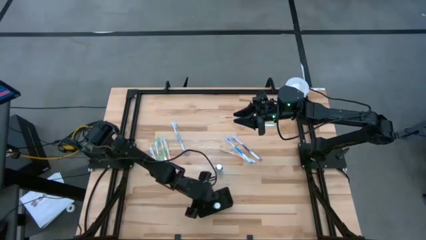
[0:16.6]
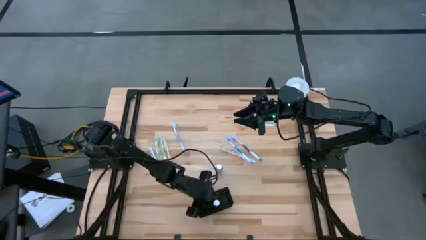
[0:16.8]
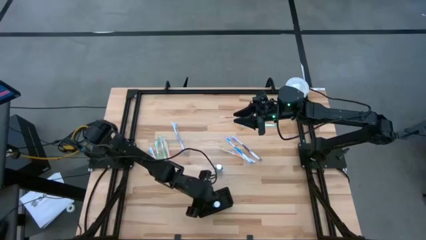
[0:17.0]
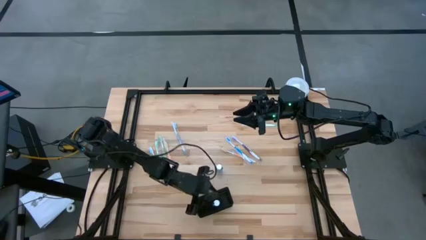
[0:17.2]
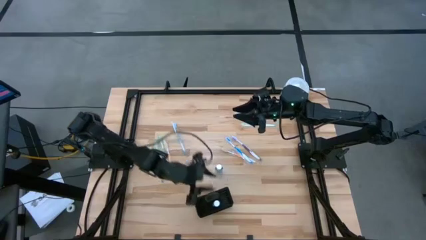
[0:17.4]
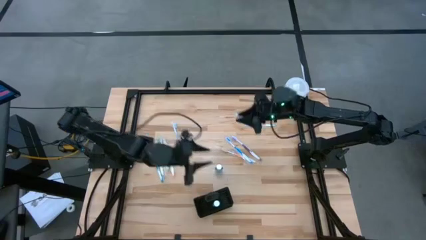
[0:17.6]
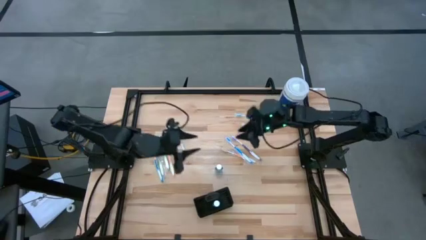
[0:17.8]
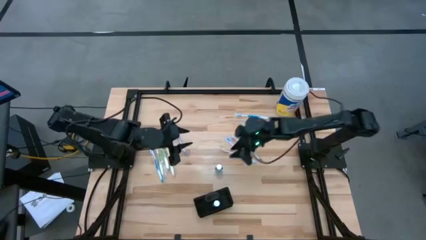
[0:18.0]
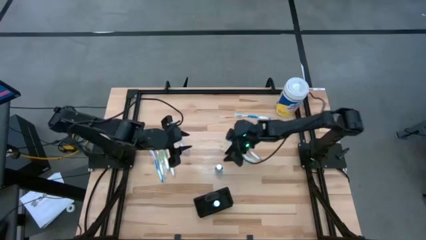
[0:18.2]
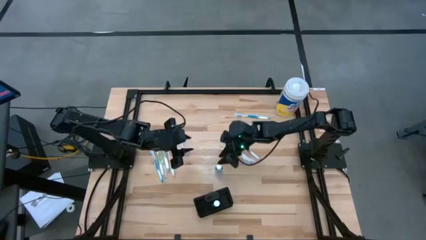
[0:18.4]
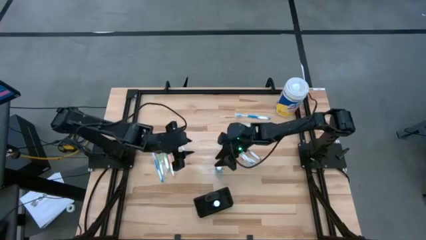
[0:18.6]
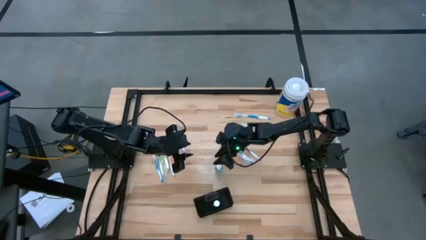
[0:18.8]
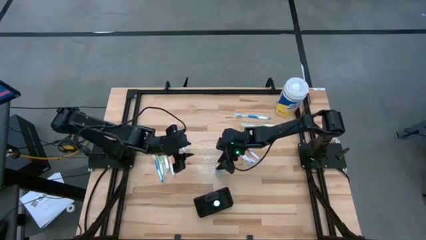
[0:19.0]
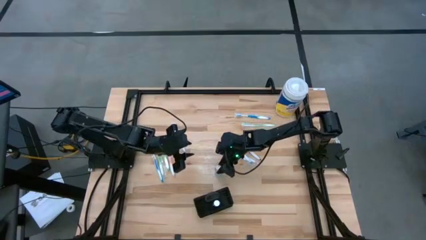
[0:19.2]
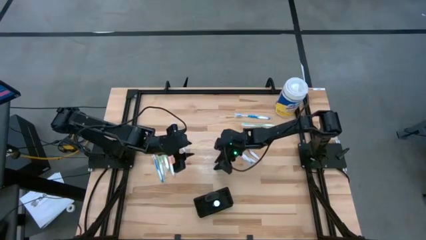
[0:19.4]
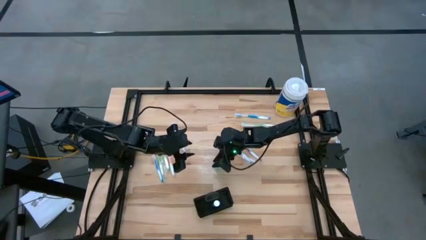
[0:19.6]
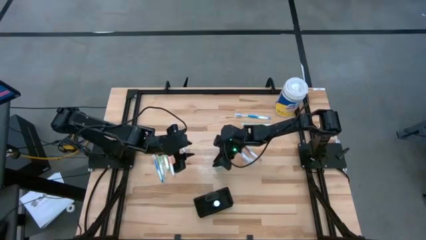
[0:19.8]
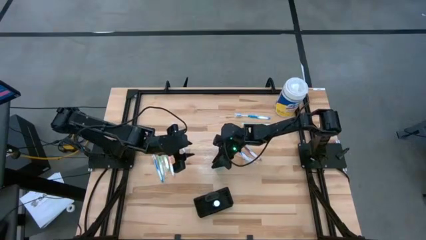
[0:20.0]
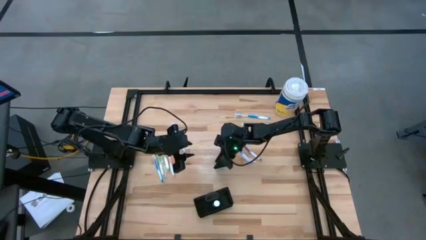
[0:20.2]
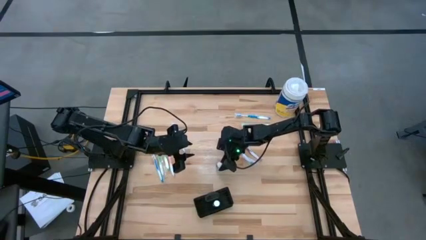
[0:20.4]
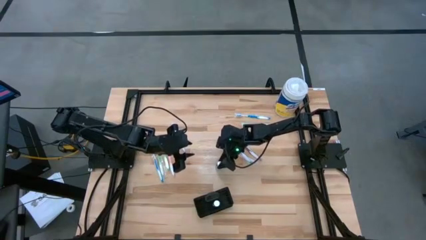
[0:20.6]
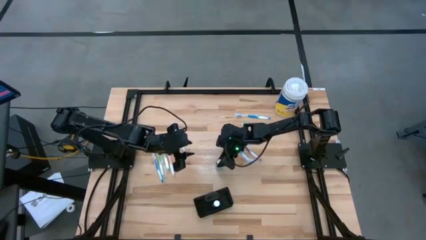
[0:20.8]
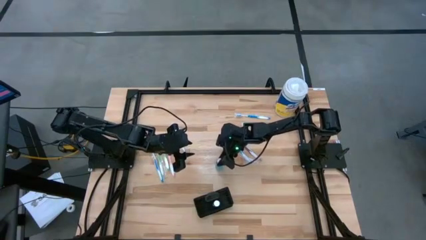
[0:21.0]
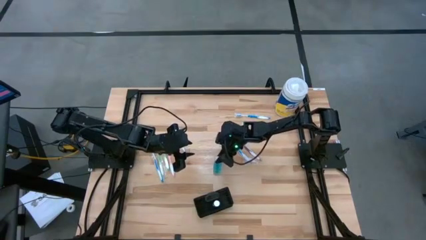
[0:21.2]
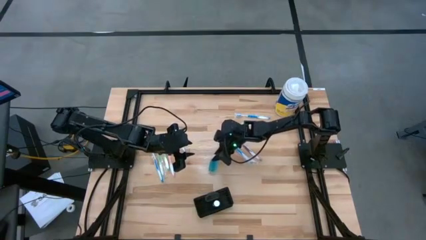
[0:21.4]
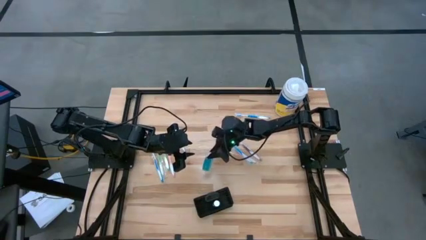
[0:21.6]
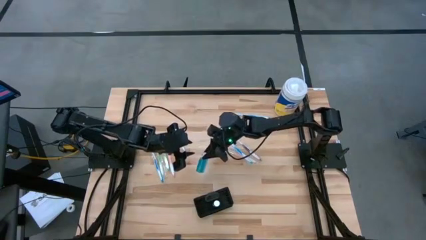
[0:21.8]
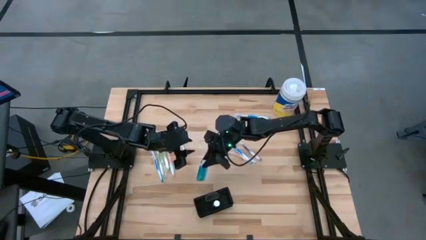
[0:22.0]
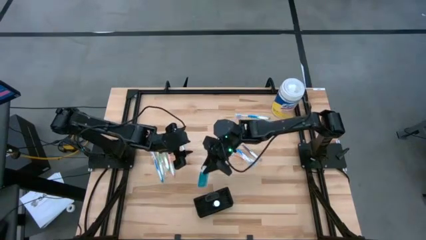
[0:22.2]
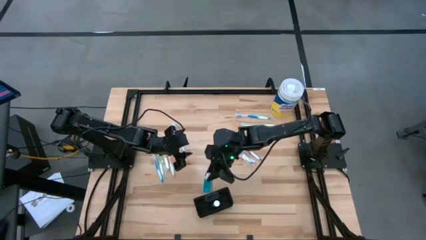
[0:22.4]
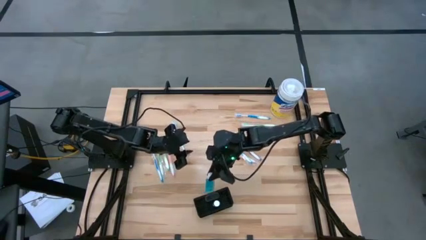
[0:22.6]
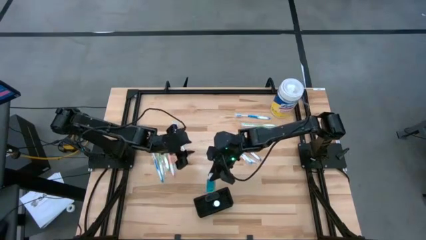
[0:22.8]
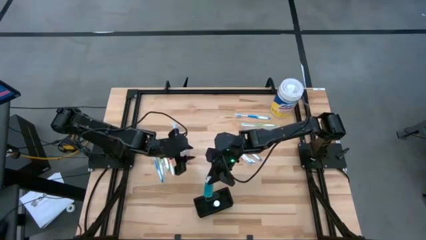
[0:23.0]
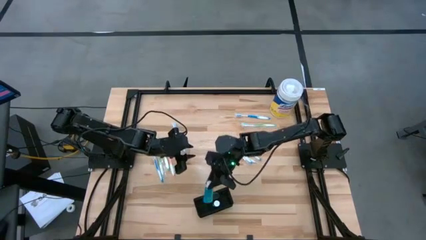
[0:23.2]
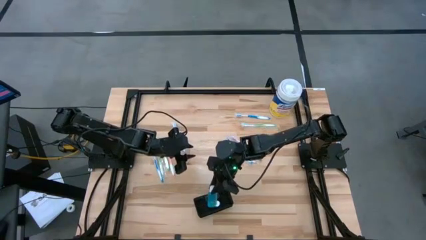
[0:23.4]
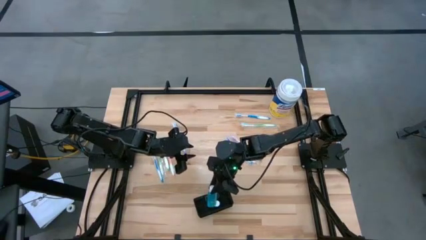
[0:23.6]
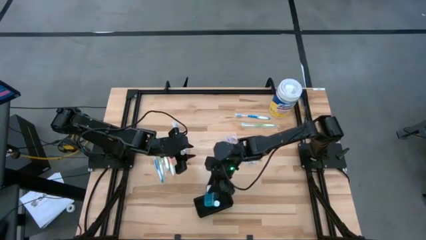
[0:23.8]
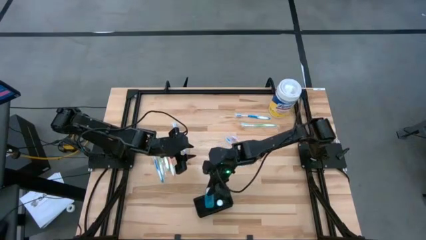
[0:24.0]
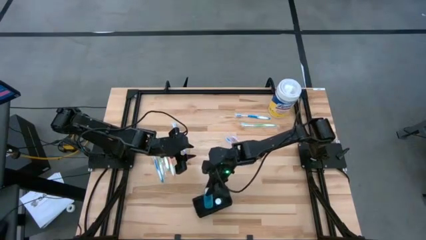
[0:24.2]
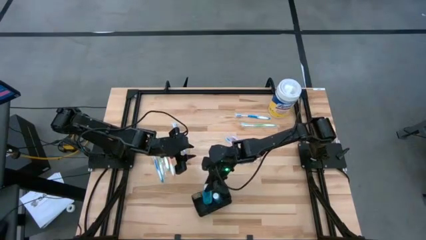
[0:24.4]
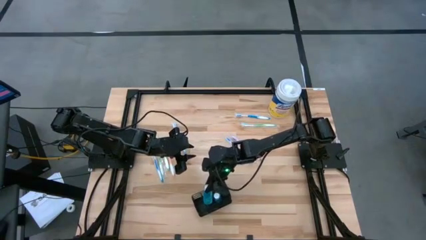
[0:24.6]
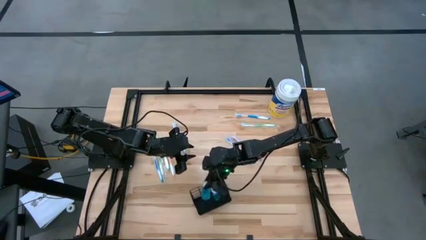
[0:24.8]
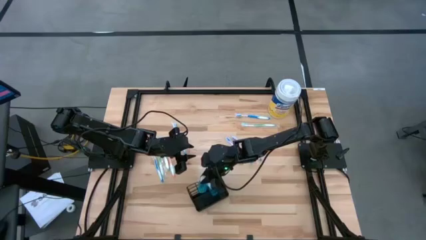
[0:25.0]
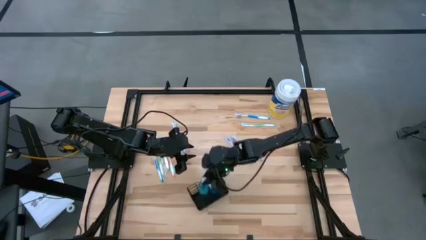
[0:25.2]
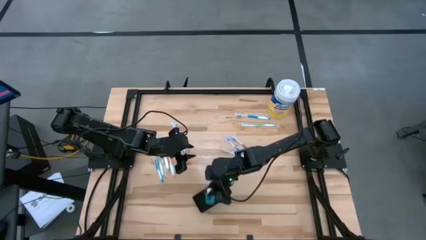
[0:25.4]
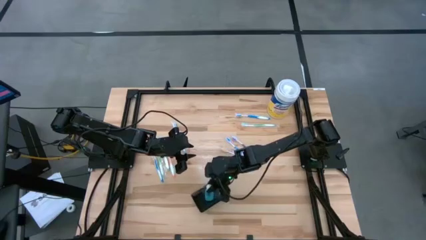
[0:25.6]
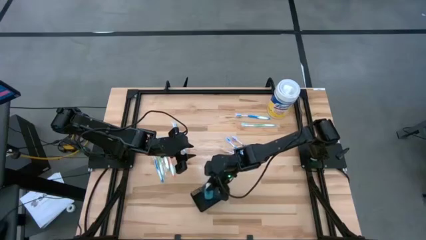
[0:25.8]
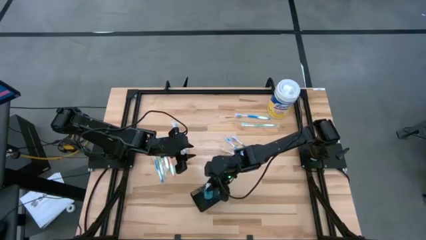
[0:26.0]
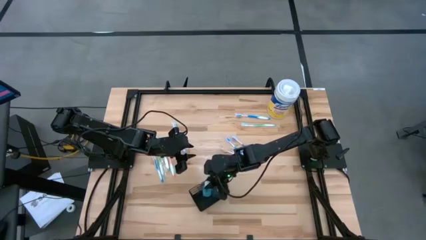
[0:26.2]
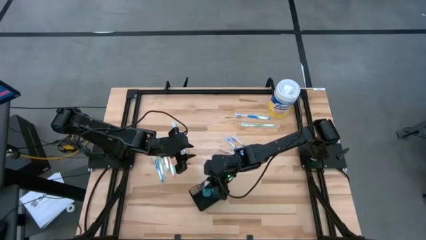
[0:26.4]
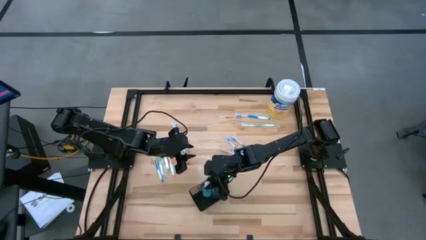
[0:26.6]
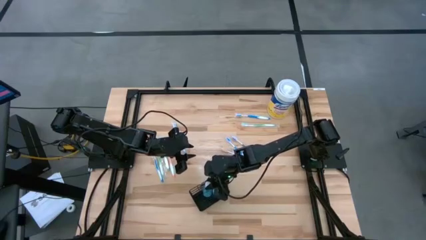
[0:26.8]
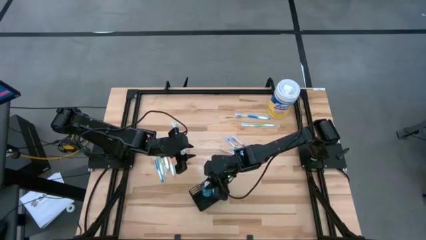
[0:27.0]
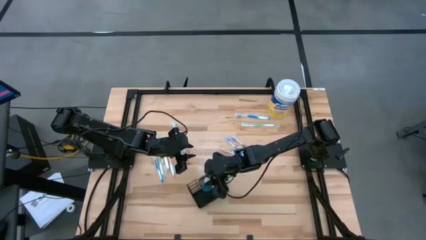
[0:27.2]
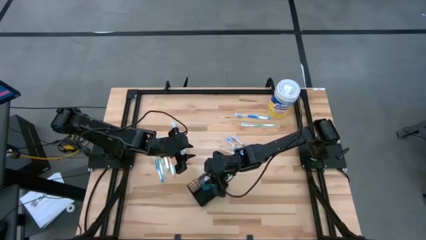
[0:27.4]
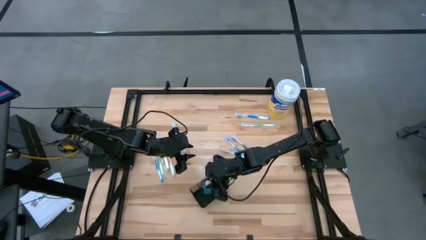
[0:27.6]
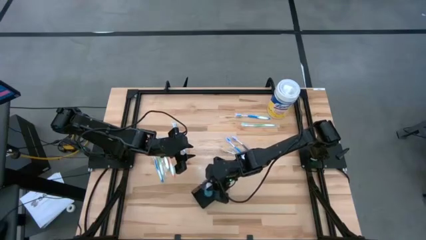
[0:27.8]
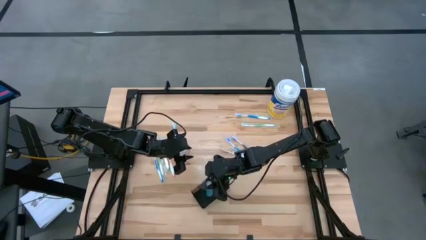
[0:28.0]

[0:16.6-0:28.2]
Task: Pick & Place toothbrushing station
Put the mouthwash into the mesh organizer

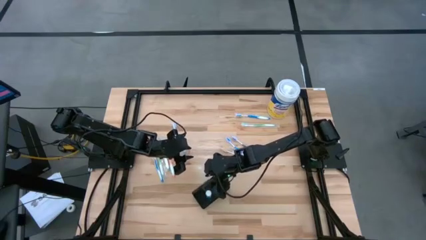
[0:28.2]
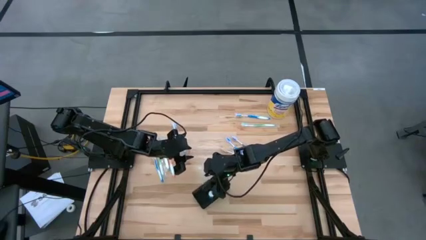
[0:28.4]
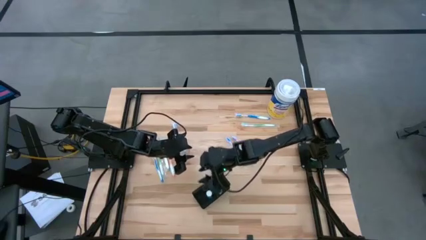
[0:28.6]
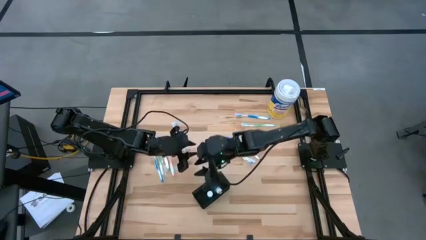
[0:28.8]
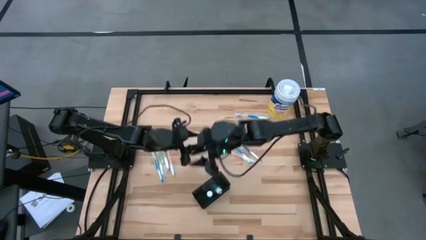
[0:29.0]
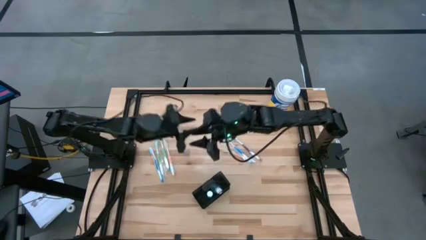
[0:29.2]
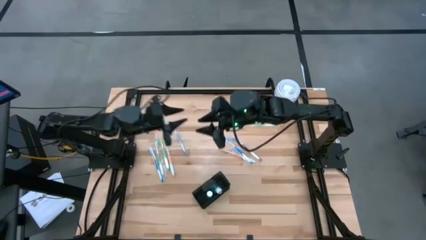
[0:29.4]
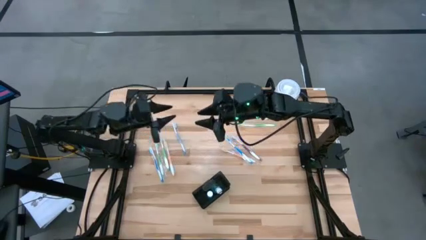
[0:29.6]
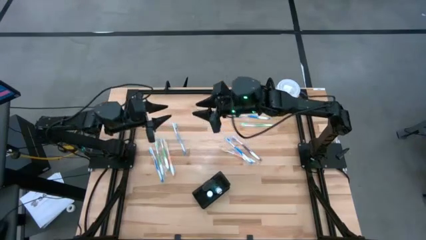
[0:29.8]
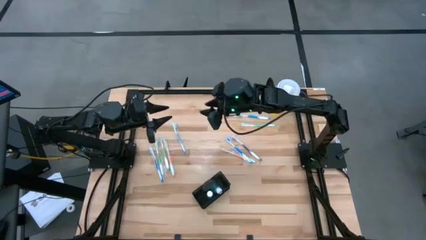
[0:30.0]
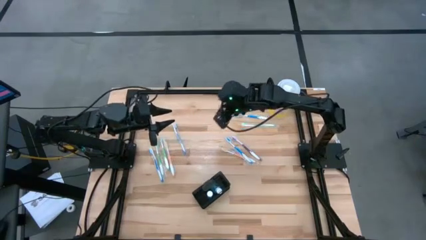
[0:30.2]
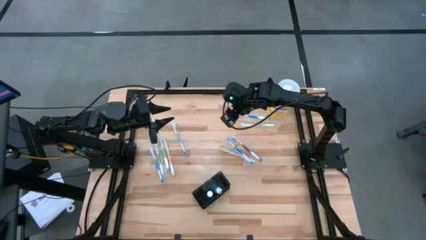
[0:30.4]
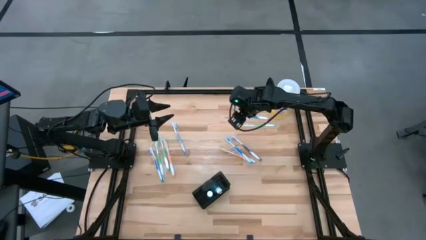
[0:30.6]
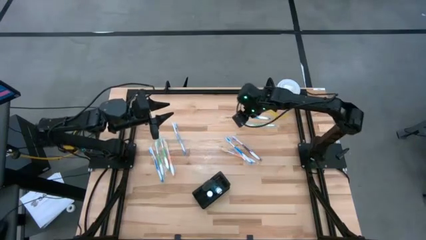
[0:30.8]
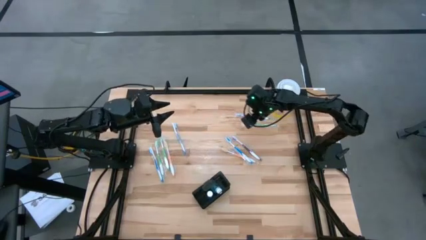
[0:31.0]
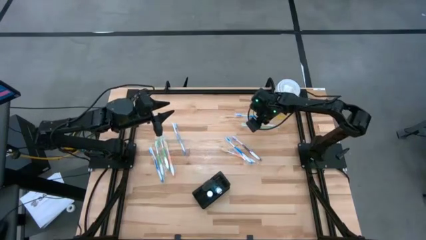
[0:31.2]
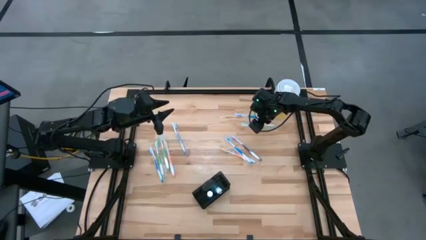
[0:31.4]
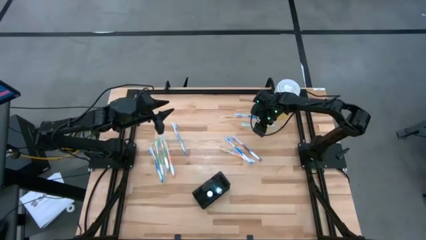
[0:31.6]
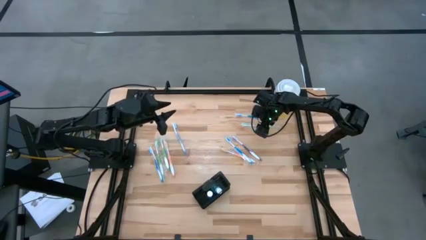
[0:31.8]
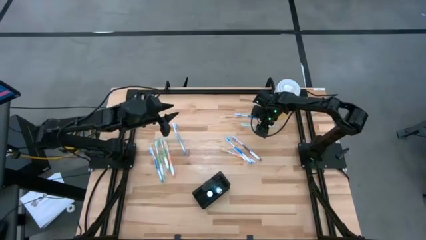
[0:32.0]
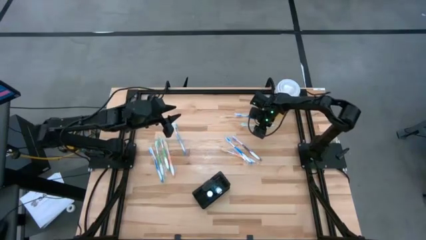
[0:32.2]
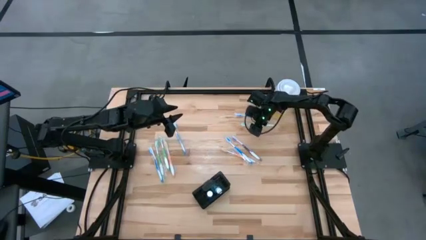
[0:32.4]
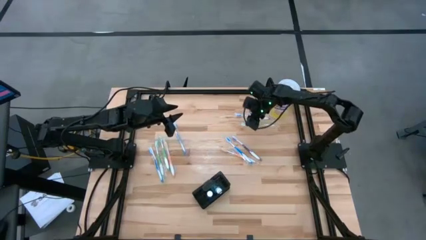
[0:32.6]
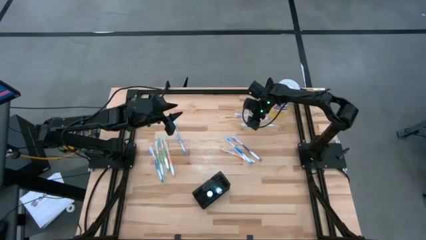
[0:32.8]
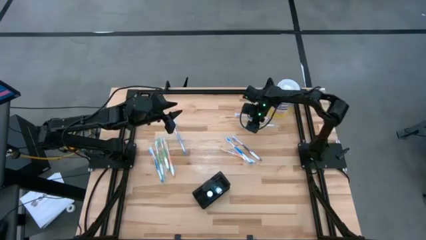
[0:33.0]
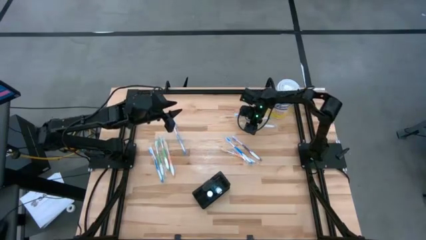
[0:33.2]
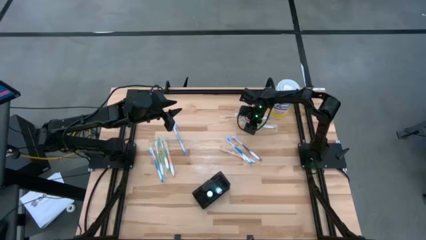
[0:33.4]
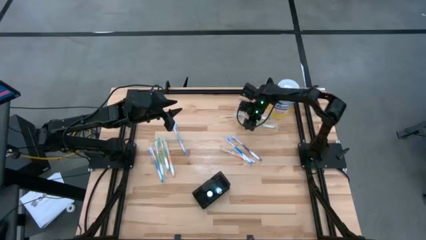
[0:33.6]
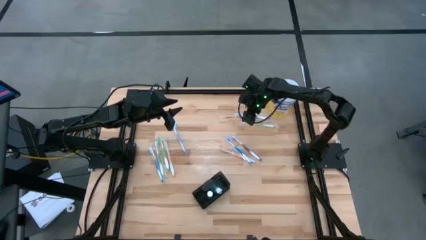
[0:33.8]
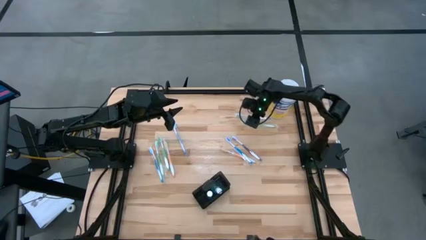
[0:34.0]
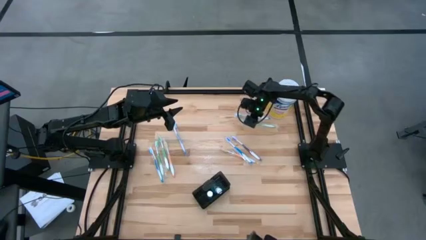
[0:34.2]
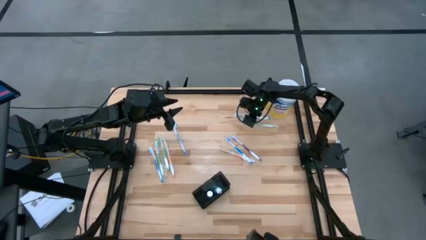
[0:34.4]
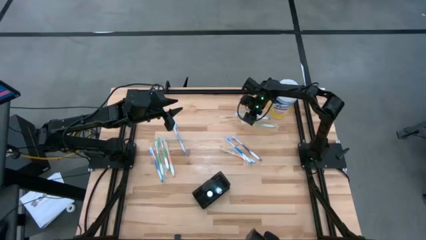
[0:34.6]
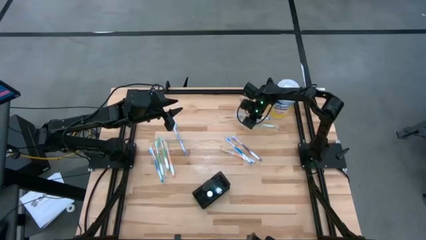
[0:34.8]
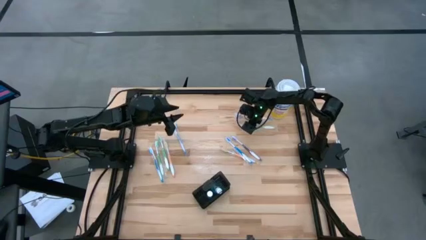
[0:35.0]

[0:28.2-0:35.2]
Put the green toothbrush into the mesh organizer
